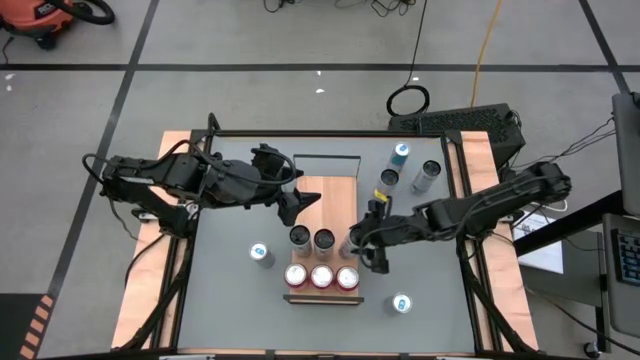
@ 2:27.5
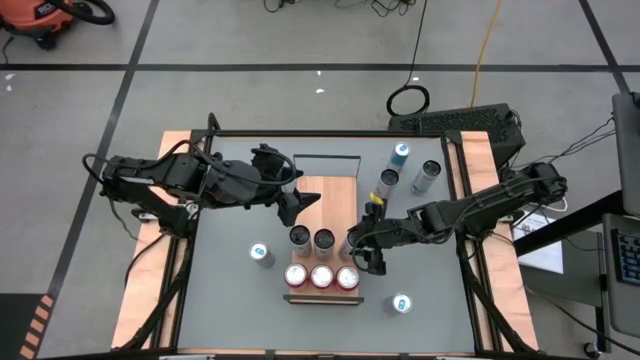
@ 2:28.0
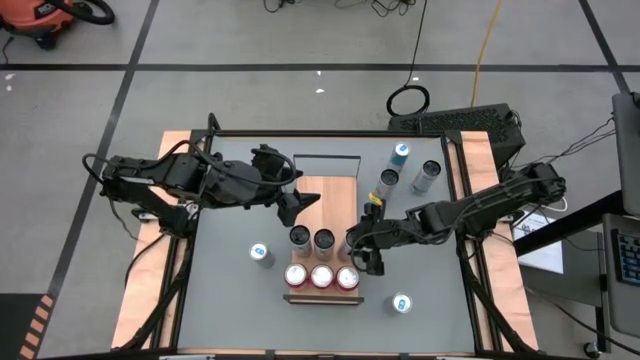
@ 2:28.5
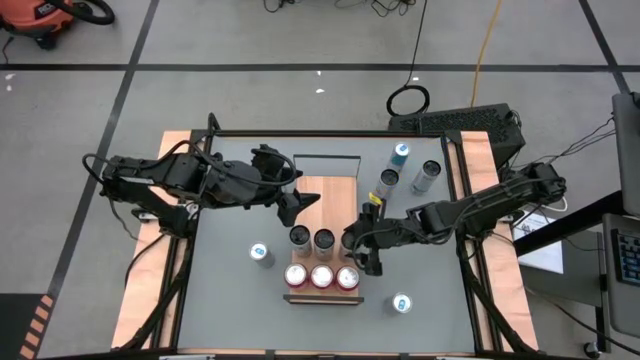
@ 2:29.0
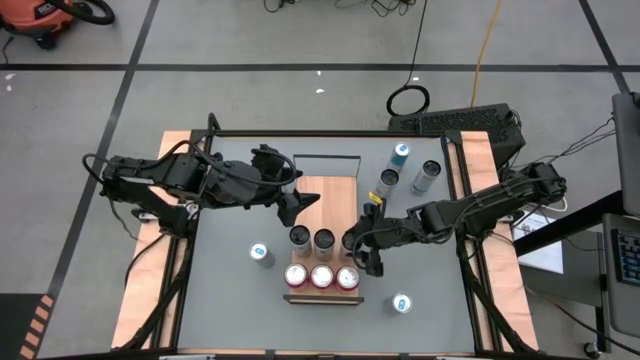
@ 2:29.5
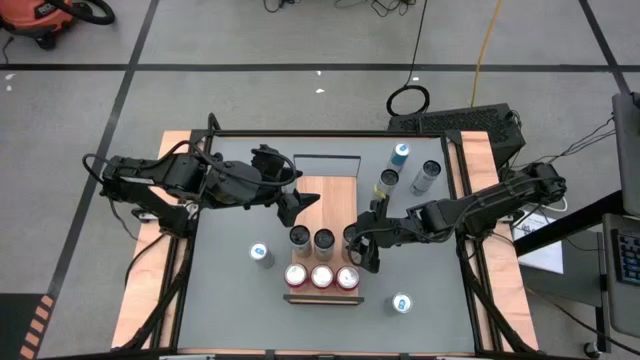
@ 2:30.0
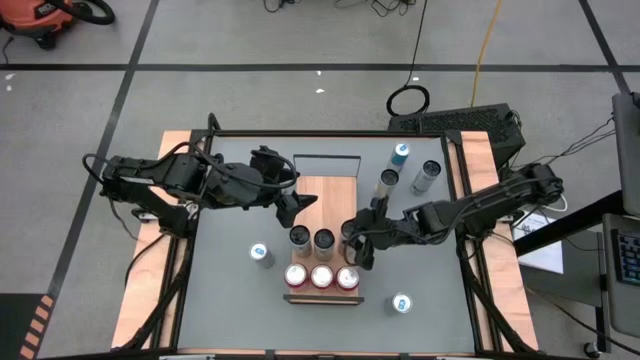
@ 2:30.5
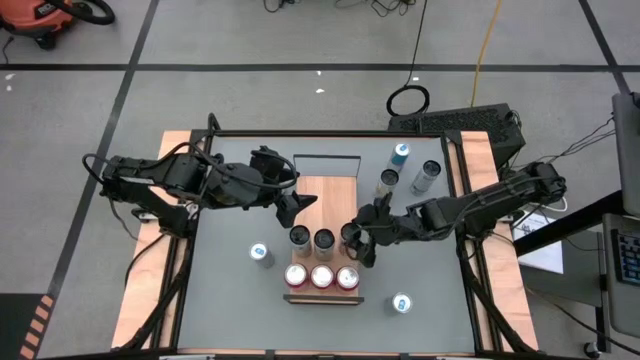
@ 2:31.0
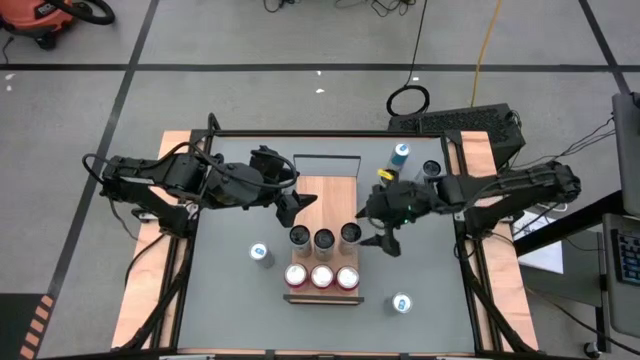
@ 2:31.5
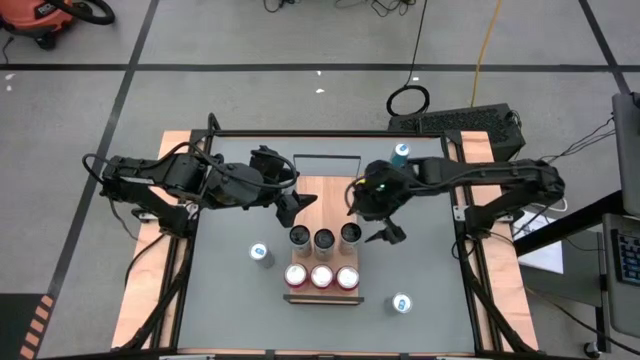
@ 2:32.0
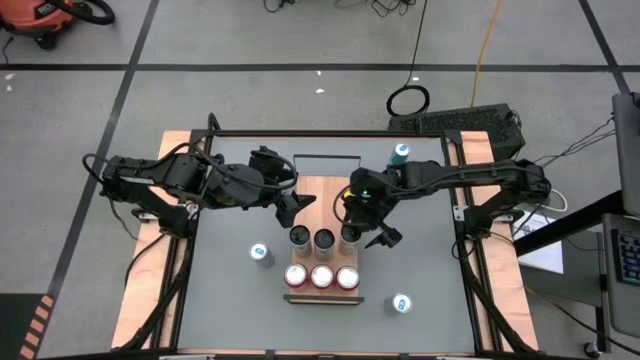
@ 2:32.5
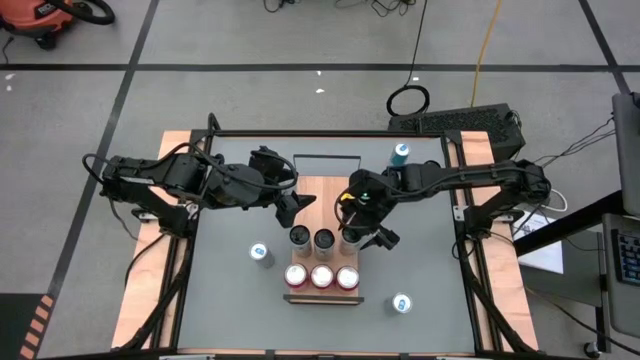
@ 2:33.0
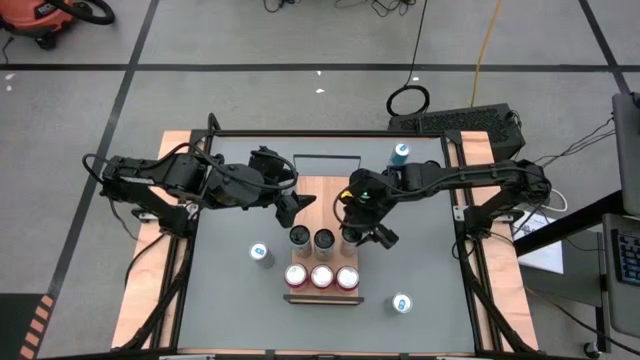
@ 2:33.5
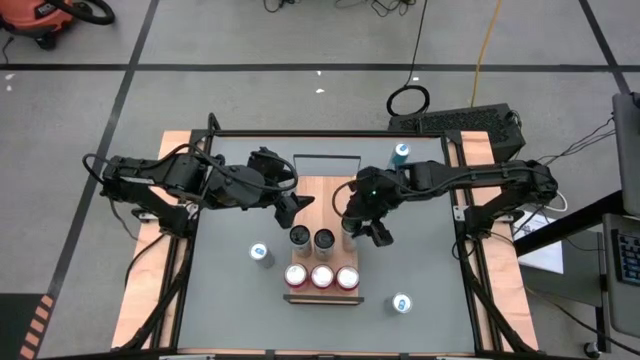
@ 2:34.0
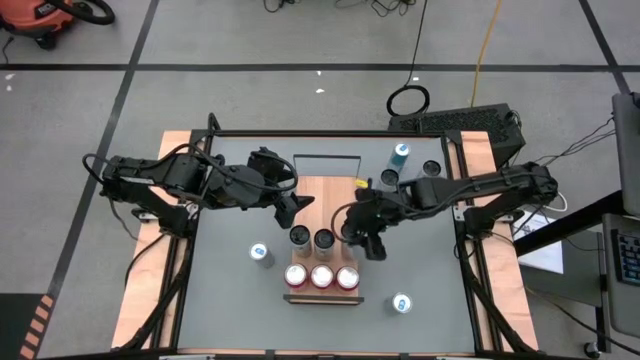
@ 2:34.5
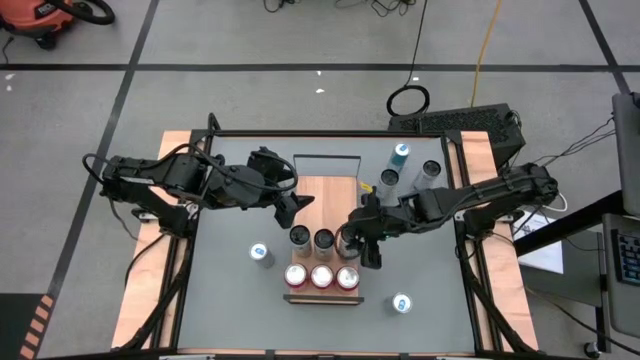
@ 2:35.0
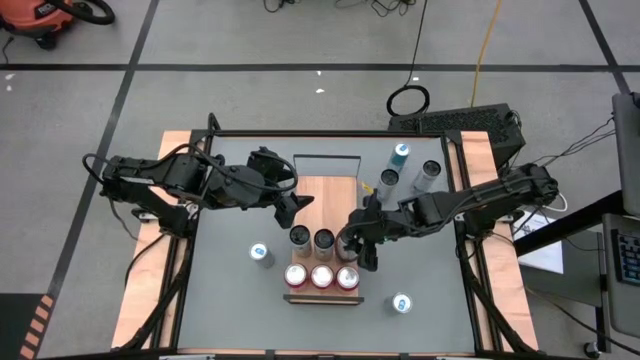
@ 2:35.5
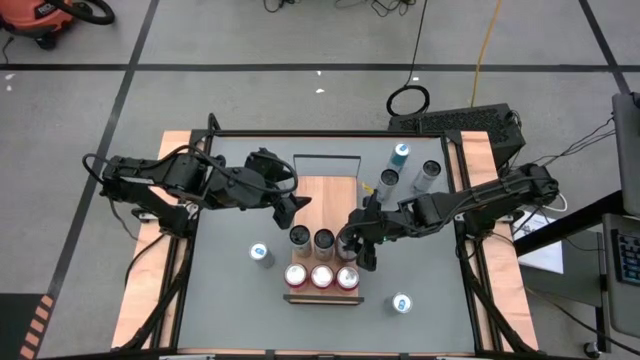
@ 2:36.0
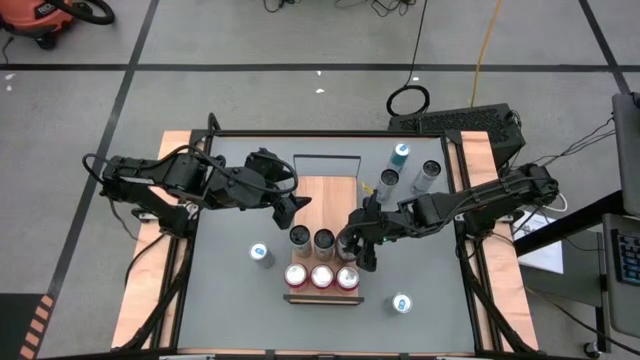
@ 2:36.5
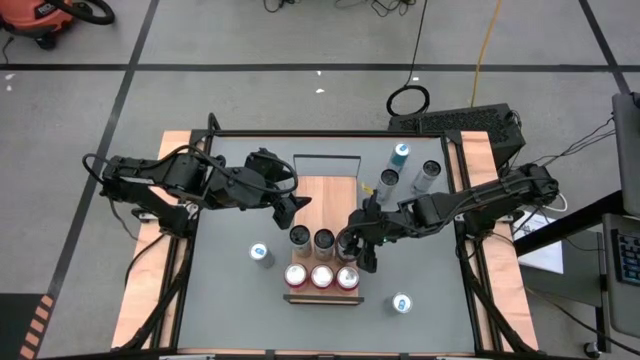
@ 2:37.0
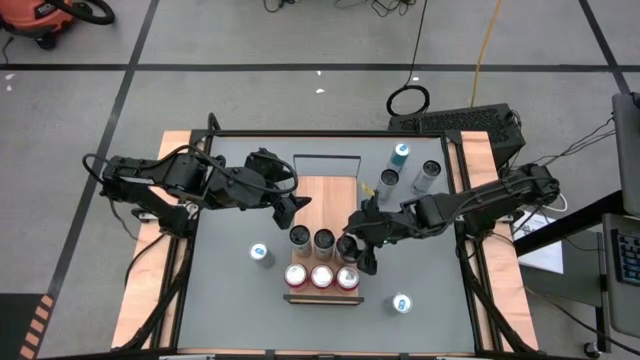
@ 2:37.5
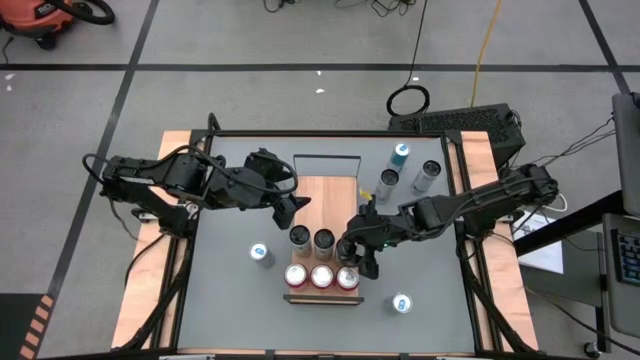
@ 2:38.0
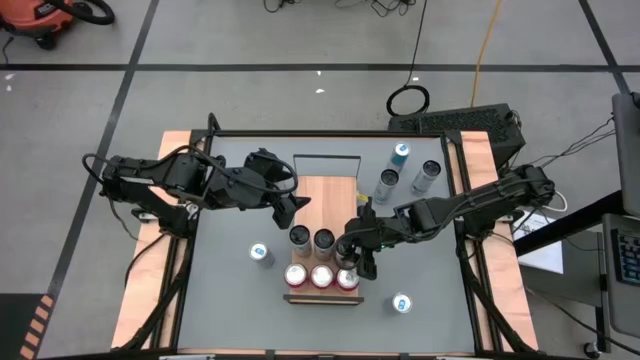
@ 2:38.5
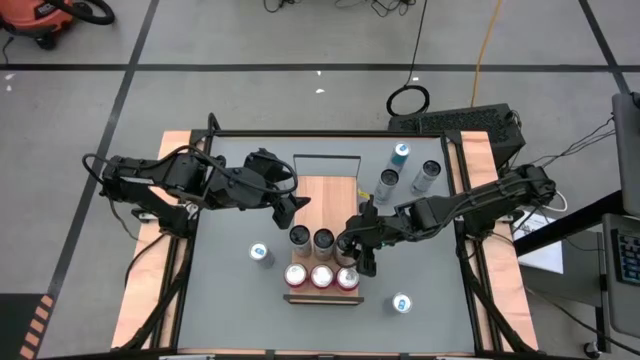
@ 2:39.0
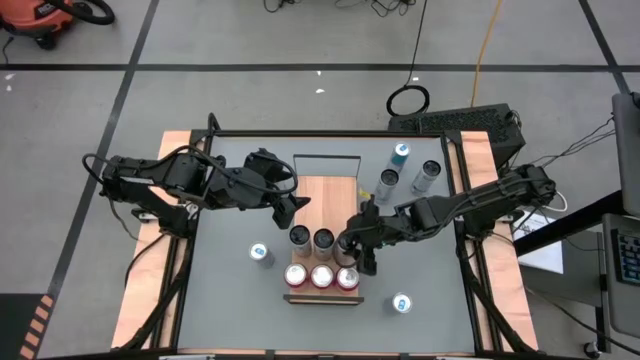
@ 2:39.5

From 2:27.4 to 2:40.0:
Task: Sort soda cans
Put the white pink soda can on the shelf and align it with the other white pink soda cans
